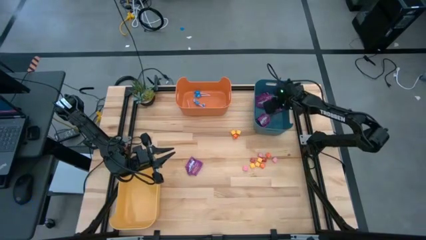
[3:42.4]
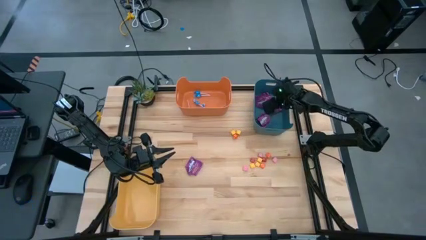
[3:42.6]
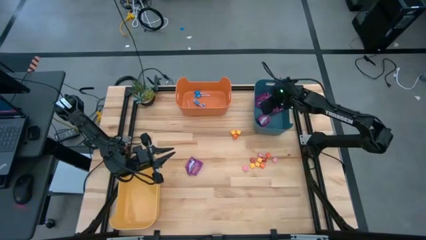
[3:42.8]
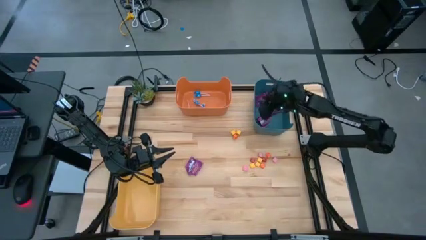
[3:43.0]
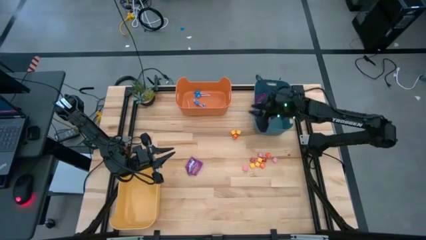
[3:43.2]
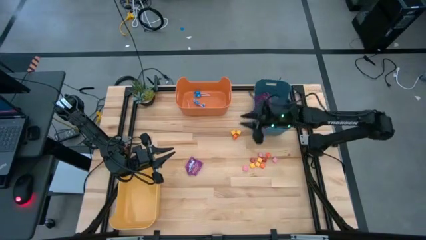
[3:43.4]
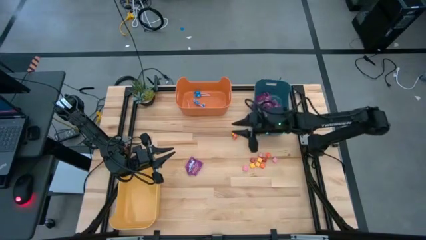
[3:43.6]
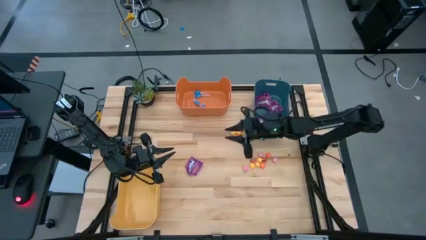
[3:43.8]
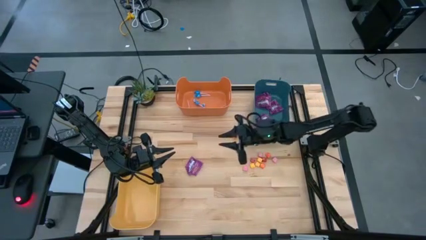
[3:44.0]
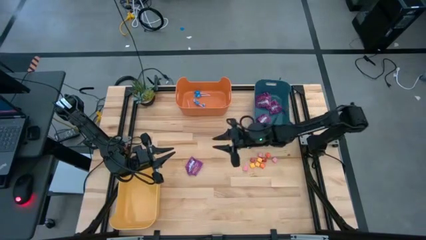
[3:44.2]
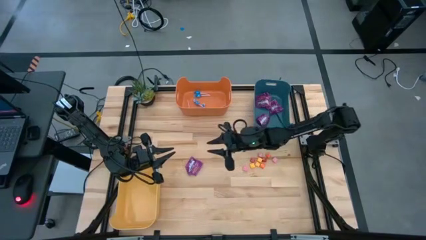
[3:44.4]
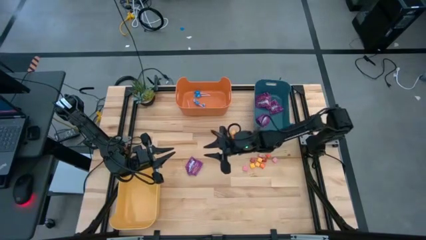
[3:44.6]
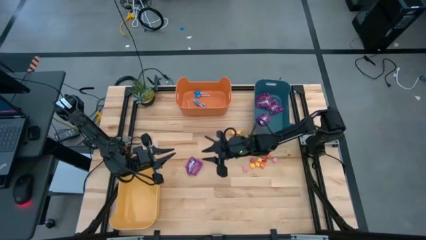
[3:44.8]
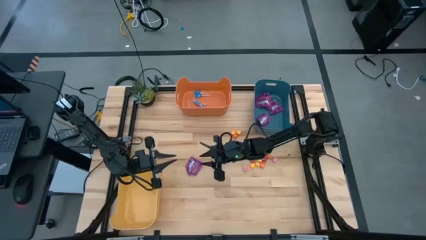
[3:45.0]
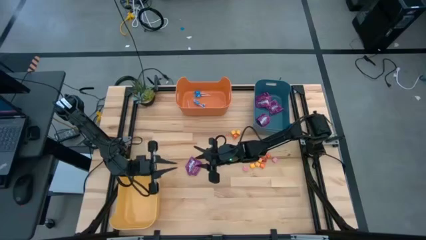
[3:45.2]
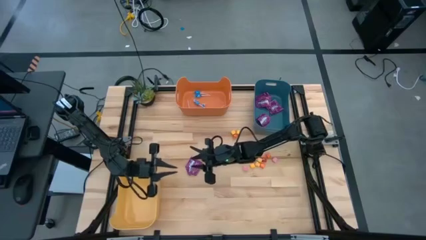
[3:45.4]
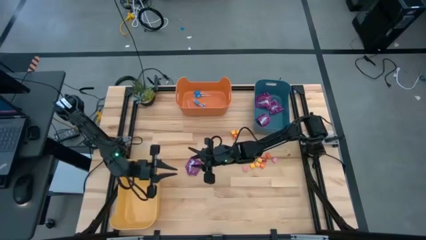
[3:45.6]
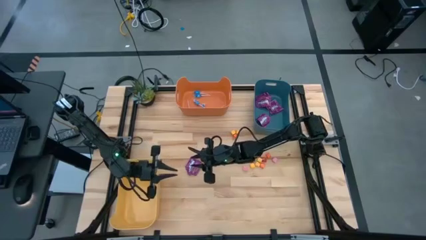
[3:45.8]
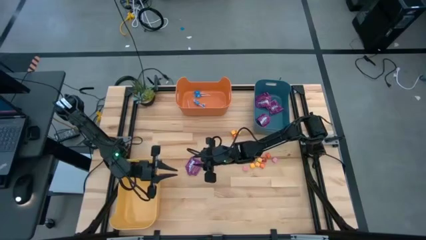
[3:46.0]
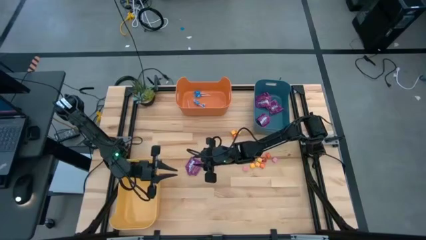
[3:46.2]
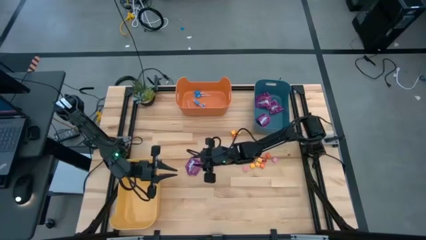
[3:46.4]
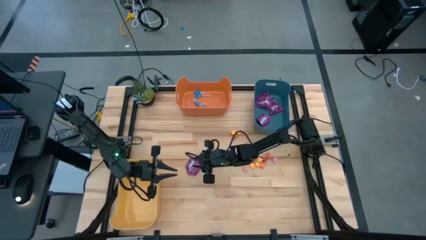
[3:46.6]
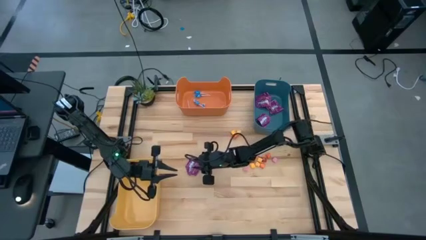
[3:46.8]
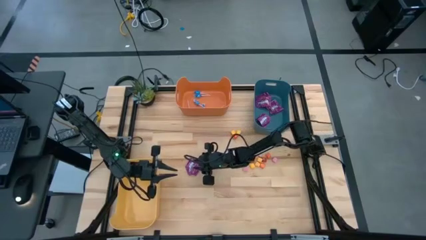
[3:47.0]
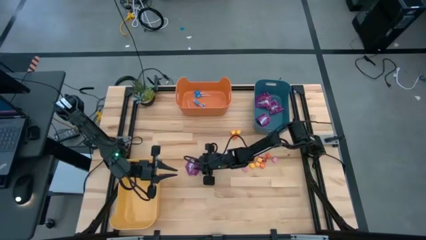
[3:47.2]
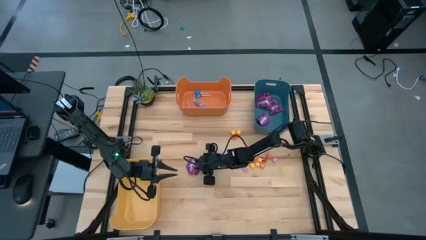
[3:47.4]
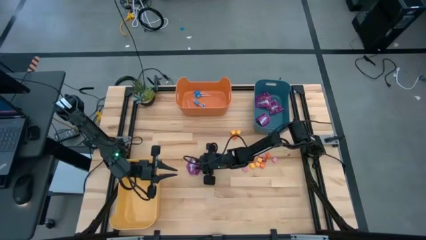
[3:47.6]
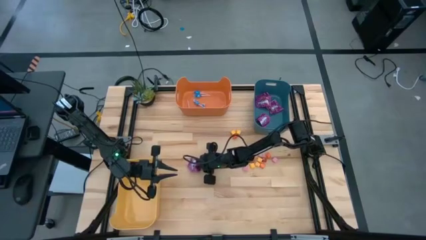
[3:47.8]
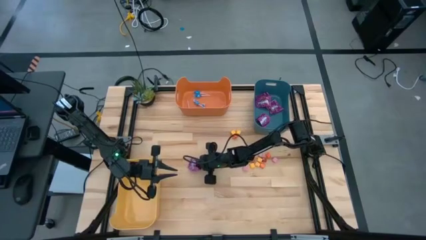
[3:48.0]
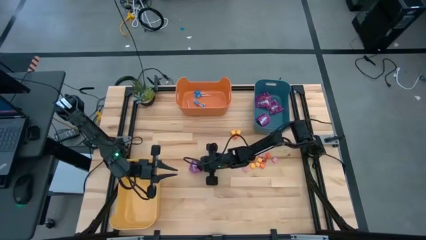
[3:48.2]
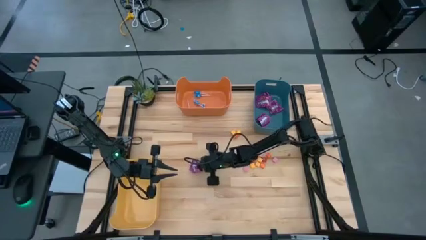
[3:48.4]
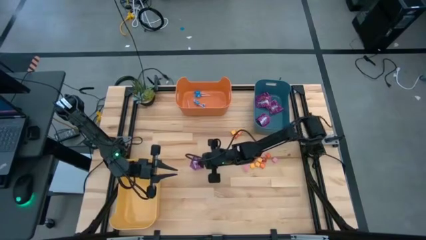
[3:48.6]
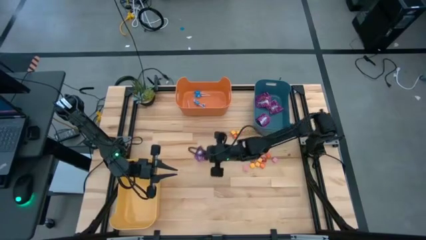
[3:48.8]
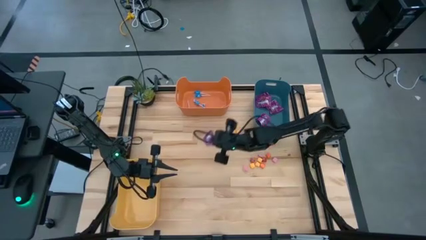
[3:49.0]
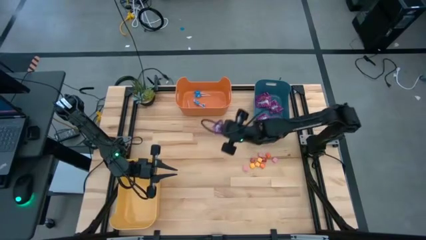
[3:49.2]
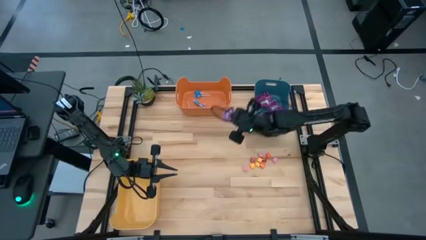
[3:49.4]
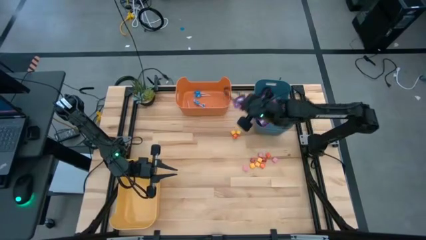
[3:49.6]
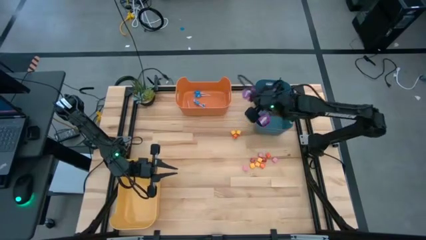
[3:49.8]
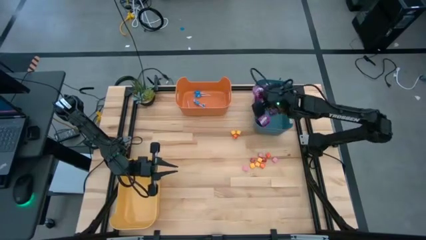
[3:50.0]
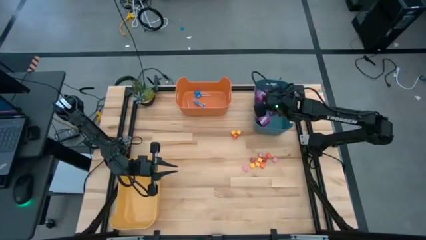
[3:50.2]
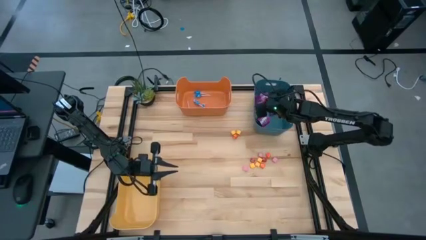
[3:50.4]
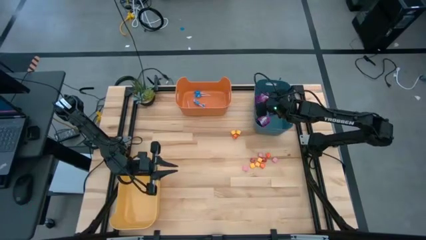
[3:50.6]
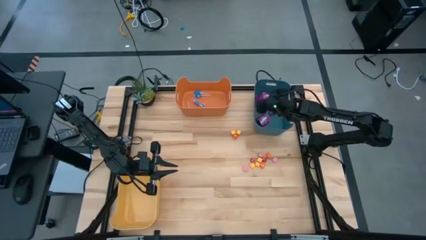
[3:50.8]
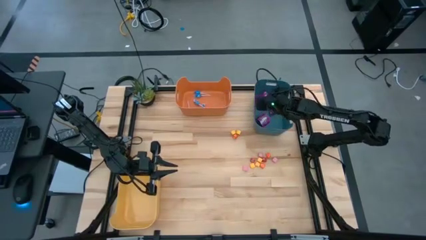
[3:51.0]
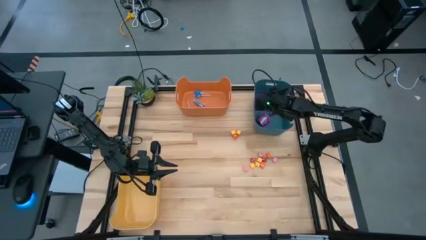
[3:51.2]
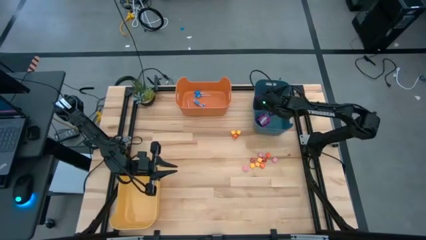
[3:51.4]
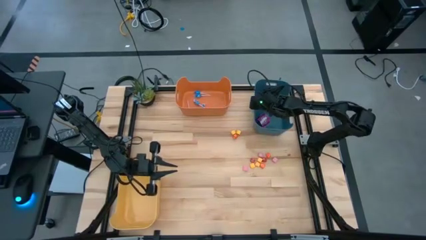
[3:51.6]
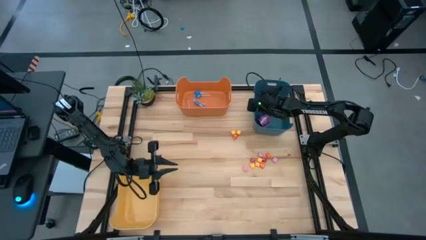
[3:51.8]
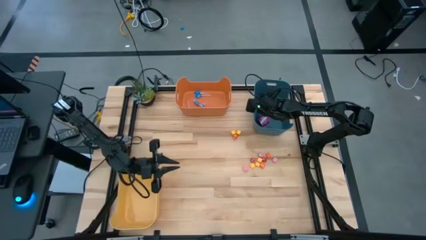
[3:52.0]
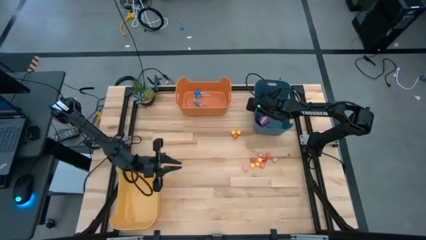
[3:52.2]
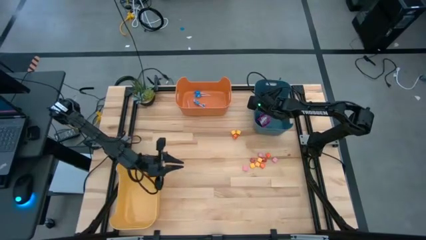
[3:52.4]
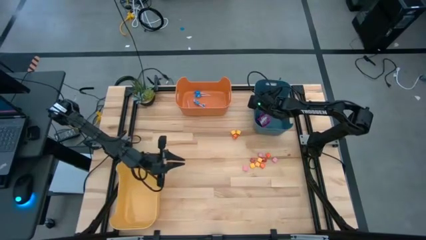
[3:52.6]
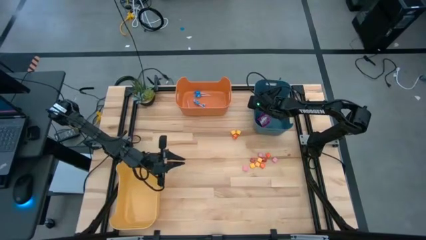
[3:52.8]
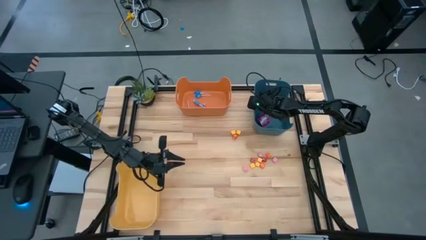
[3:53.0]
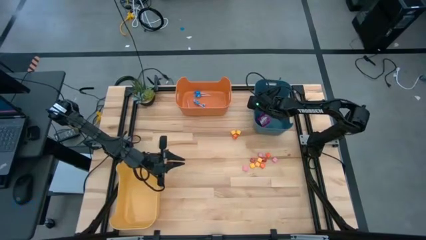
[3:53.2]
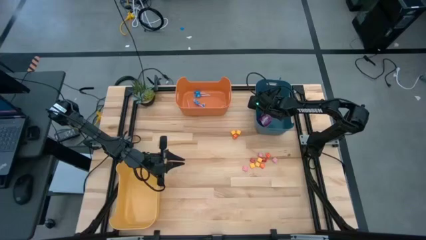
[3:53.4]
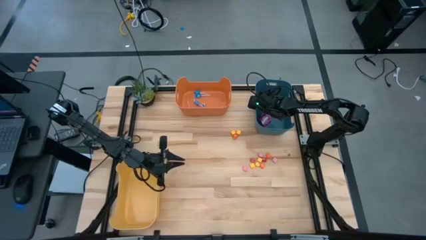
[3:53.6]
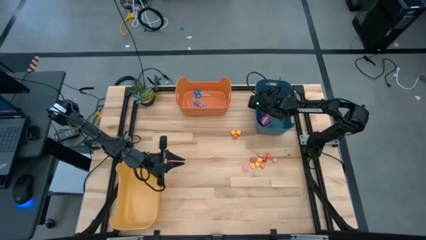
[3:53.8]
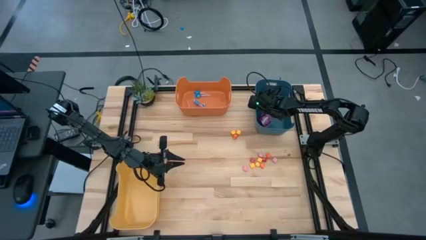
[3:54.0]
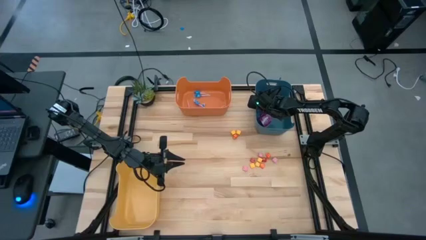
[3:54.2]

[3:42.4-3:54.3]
Task: Sort candy
Put the purple candy into the blue bin
